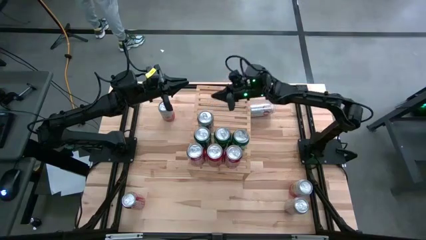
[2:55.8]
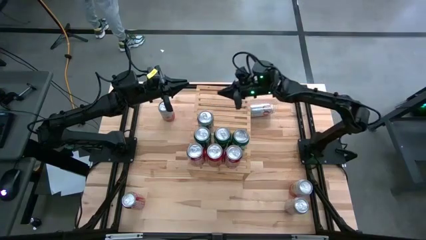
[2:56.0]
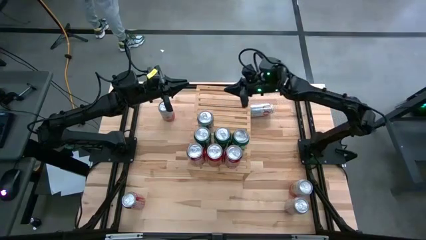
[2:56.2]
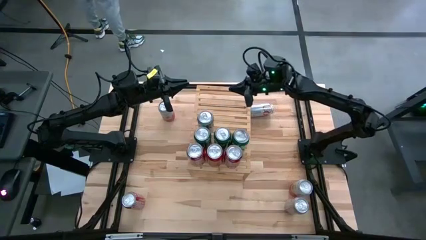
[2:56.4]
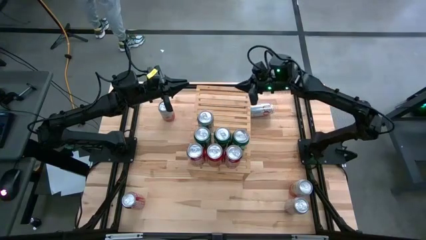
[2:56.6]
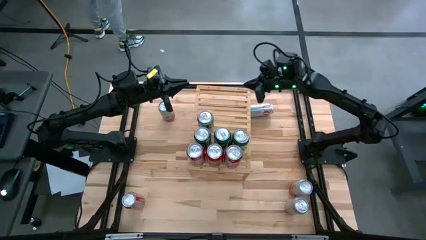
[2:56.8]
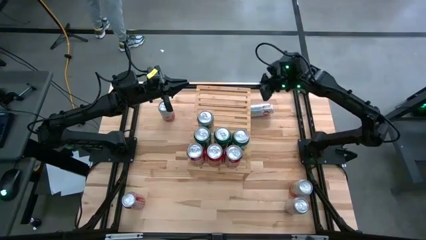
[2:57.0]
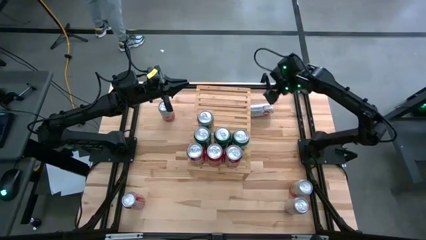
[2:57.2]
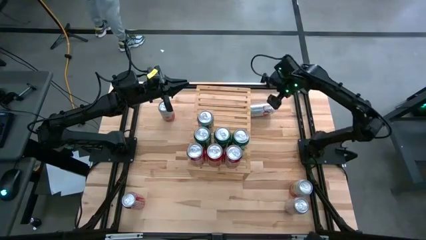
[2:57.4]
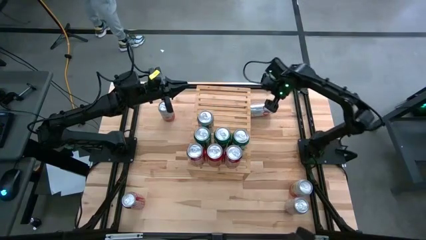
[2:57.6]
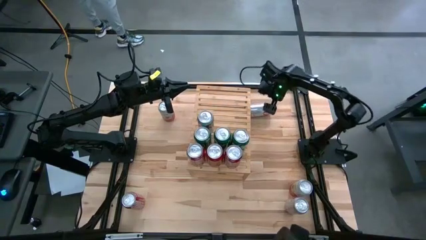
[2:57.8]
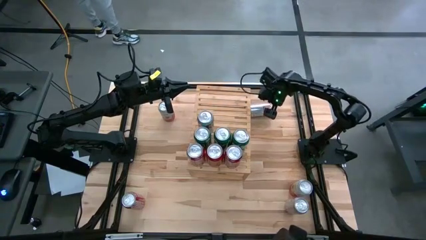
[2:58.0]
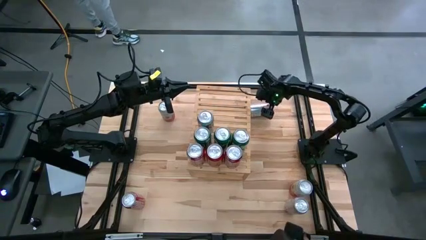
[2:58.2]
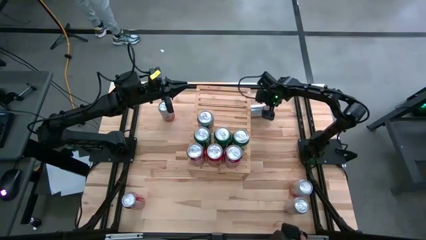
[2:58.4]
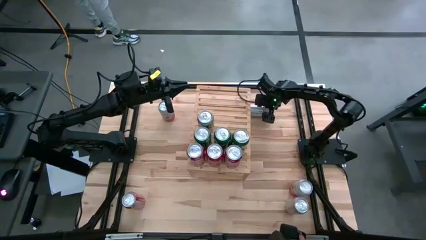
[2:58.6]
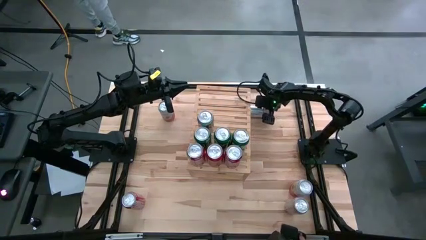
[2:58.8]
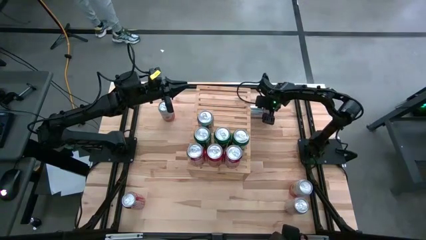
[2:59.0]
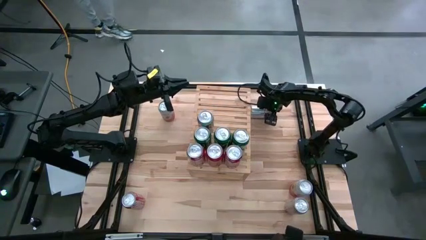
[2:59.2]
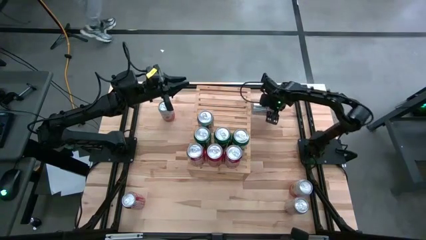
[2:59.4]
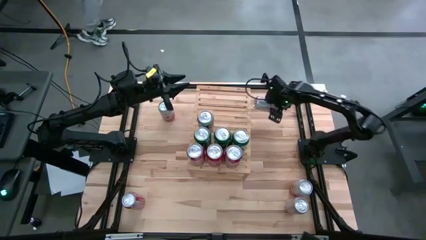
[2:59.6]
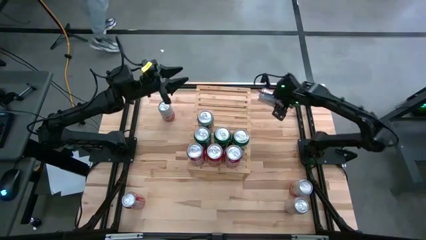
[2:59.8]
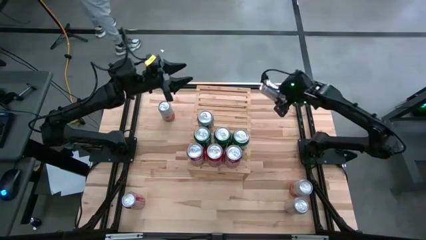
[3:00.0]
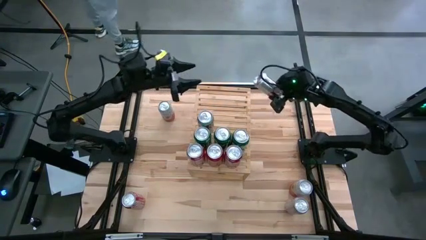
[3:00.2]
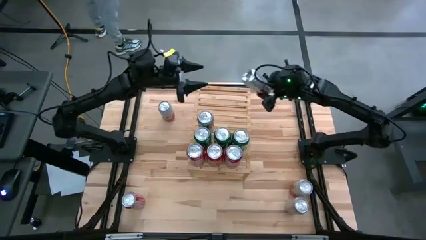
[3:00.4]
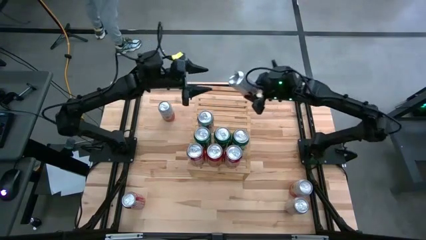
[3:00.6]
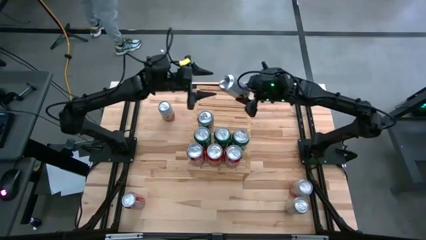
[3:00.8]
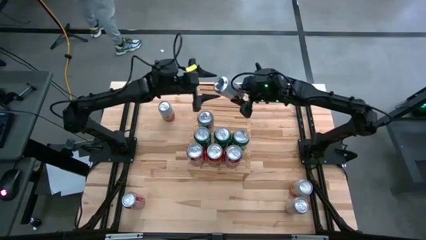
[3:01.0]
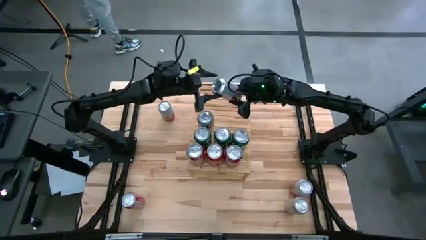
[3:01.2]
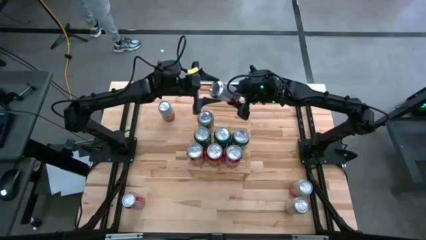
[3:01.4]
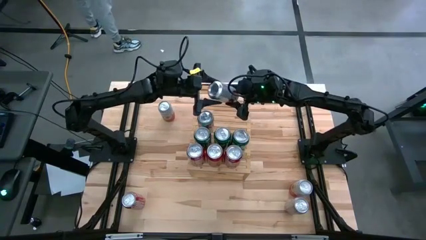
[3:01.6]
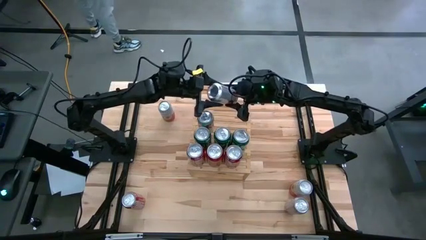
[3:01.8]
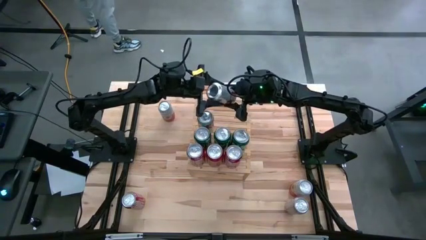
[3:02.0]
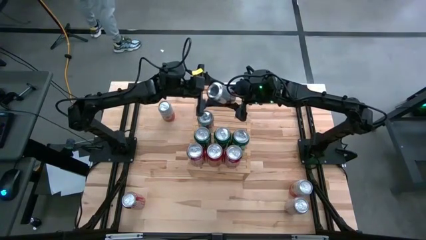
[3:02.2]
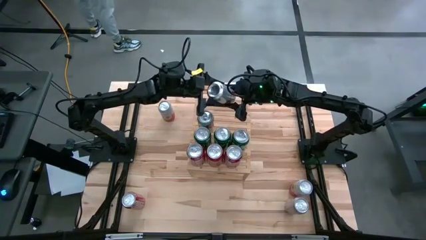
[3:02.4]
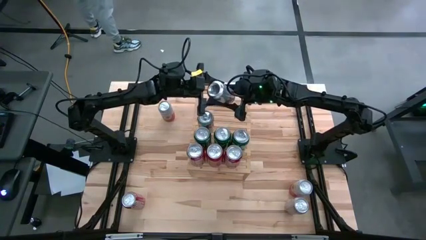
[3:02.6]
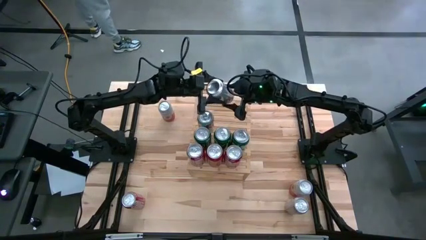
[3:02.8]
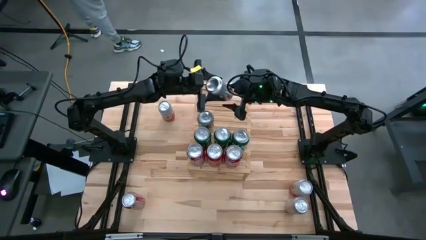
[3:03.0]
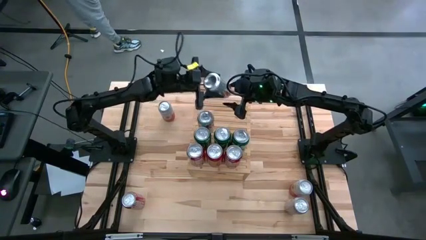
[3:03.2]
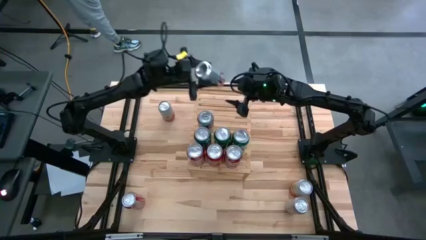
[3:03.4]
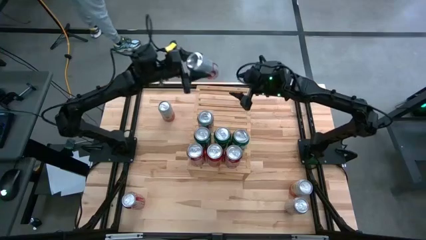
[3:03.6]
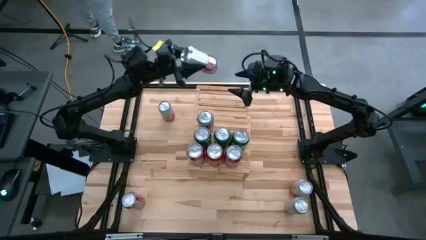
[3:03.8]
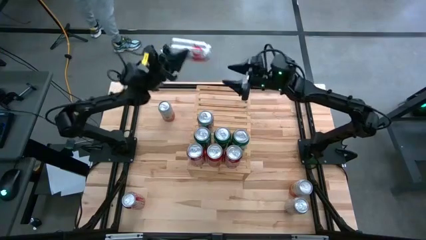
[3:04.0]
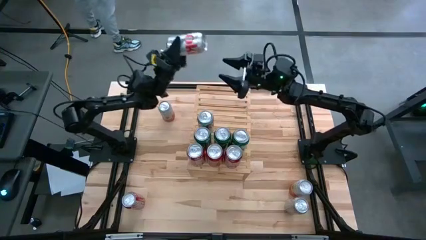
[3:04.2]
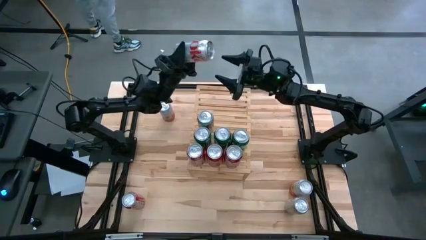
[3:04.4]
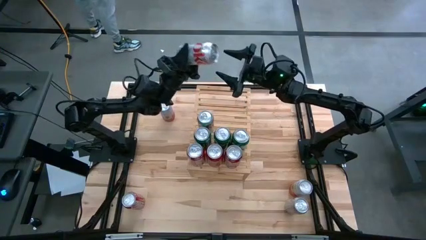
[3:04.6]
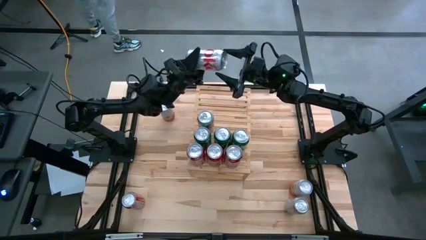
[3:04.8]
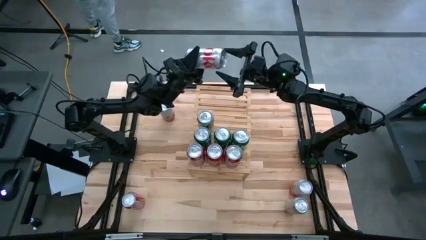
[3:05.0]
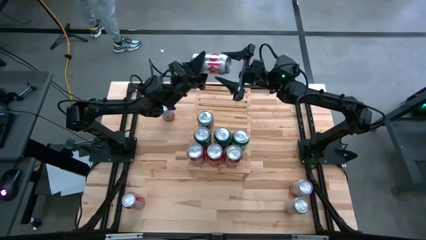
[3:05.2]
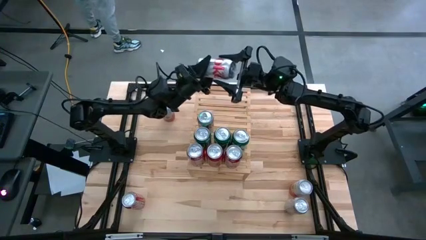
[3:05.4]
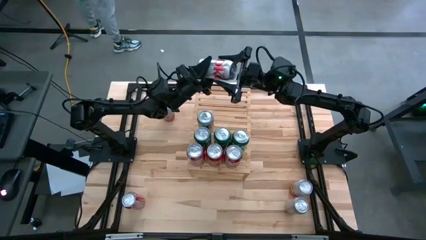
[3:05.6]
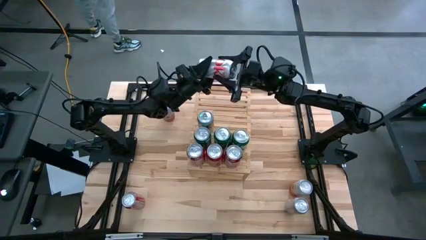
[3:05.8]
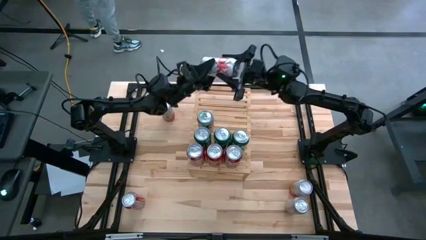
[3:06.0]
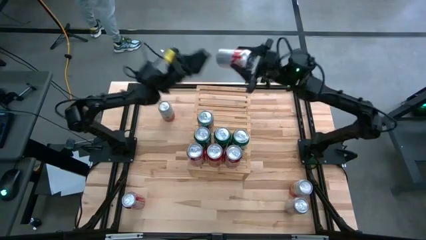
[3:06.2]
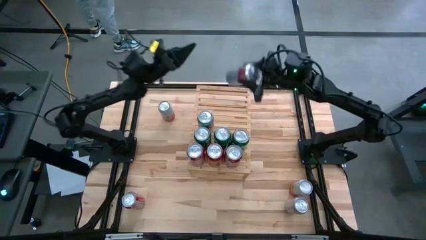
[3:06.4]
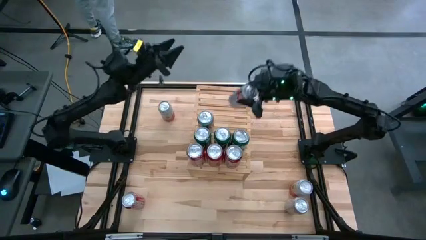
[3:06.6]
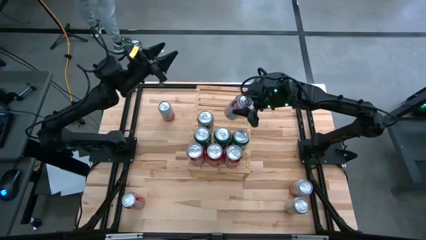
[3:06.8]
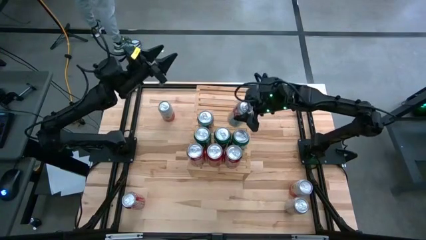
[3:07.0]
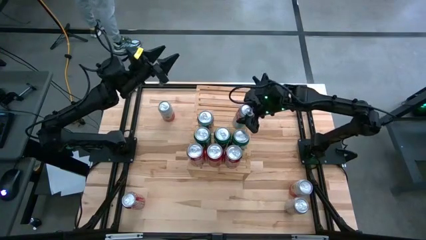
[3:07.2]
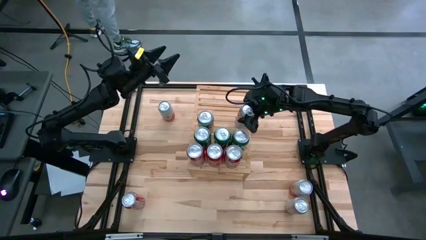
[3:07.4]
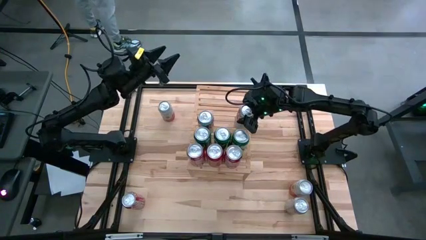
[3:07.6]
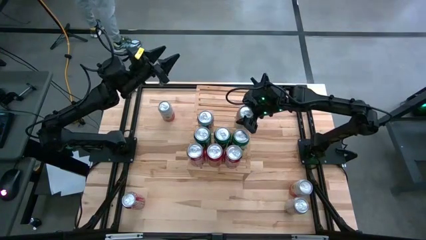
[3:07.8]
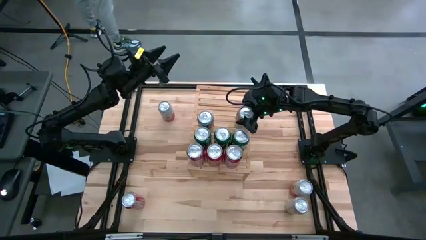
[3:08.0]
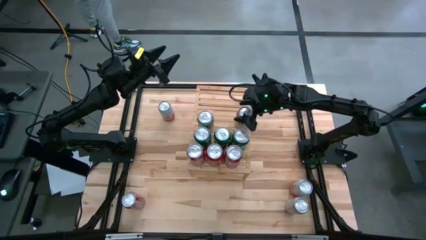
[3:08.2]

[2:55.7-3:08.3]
Task: Place canned beverage on shelf
Put the top red-silver soda can on the shelf aligned with the other red-silver soda can
